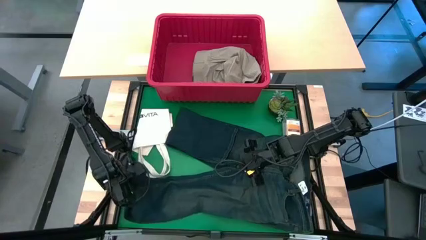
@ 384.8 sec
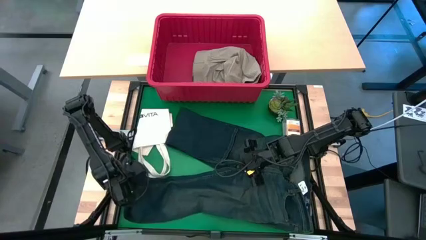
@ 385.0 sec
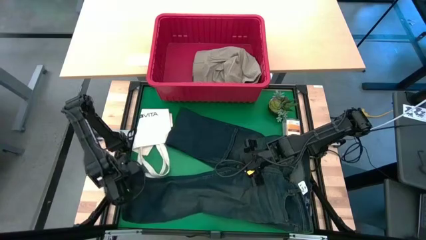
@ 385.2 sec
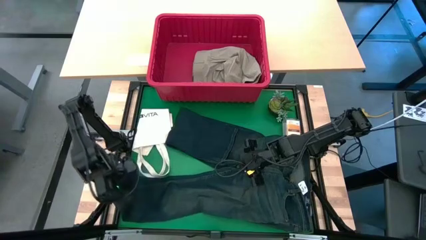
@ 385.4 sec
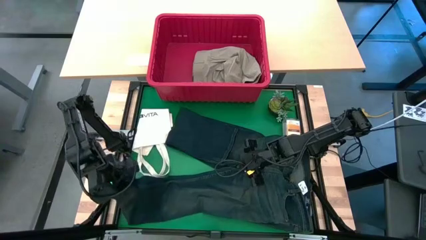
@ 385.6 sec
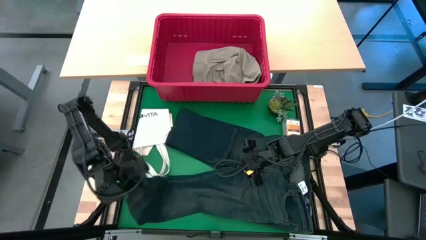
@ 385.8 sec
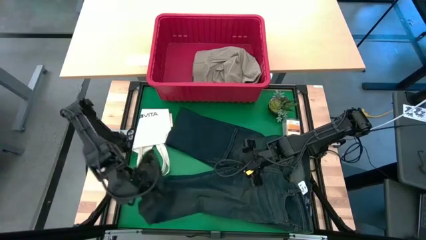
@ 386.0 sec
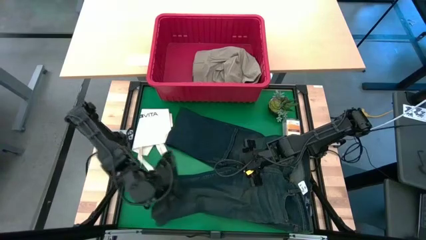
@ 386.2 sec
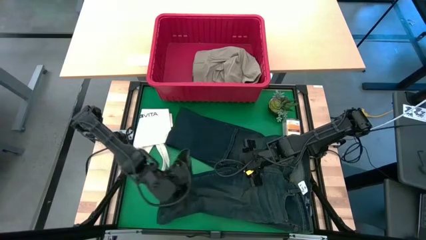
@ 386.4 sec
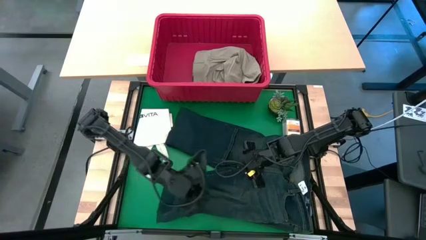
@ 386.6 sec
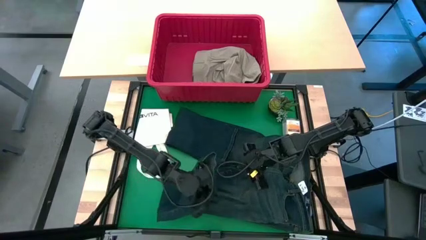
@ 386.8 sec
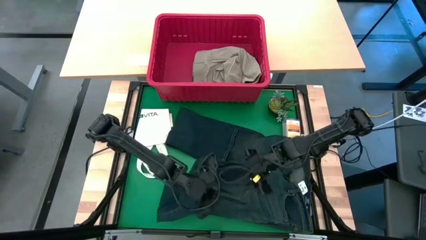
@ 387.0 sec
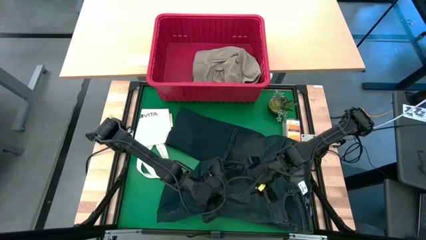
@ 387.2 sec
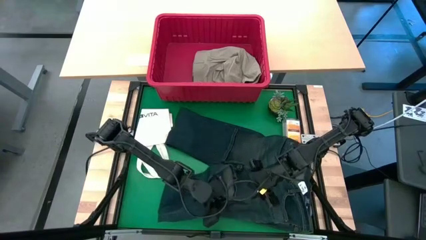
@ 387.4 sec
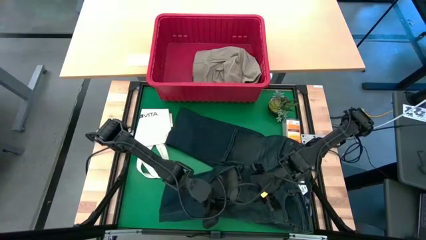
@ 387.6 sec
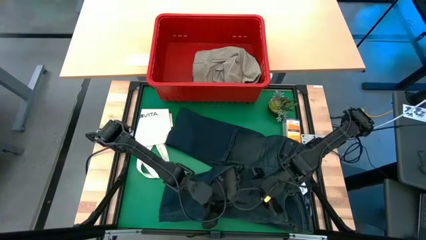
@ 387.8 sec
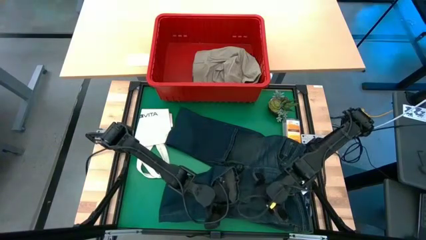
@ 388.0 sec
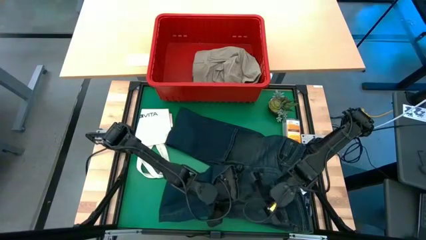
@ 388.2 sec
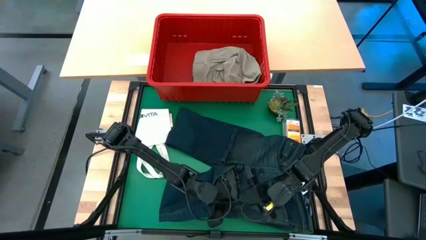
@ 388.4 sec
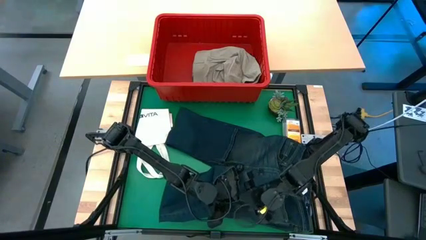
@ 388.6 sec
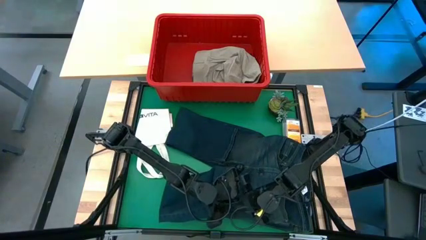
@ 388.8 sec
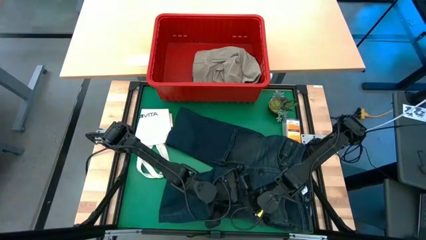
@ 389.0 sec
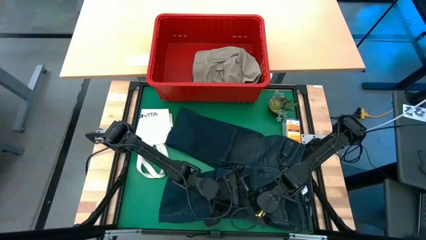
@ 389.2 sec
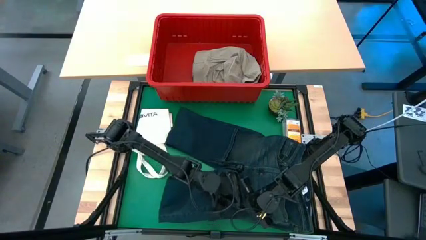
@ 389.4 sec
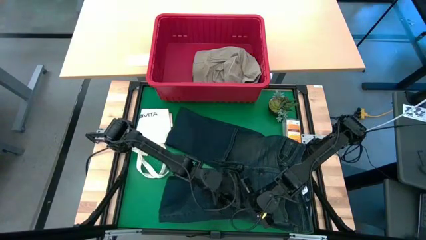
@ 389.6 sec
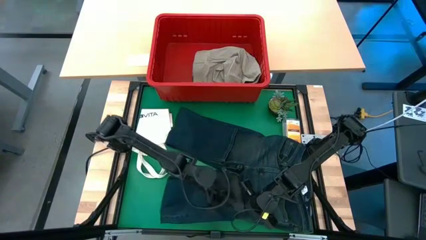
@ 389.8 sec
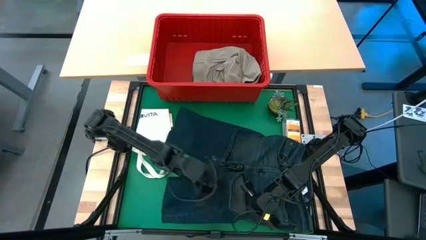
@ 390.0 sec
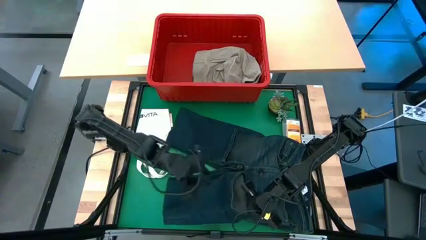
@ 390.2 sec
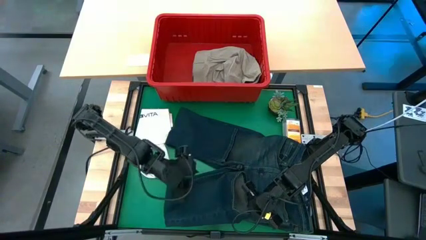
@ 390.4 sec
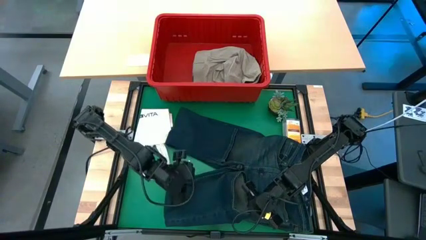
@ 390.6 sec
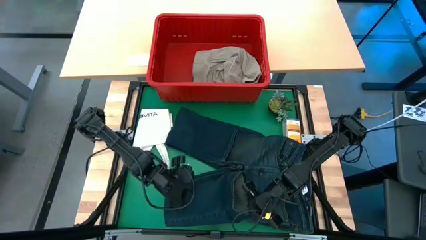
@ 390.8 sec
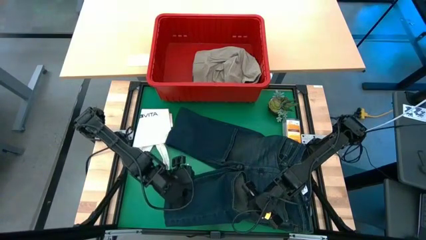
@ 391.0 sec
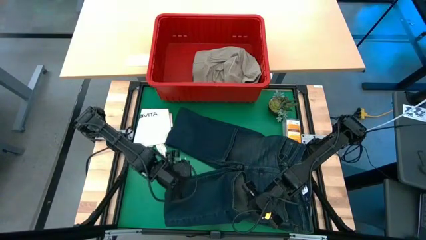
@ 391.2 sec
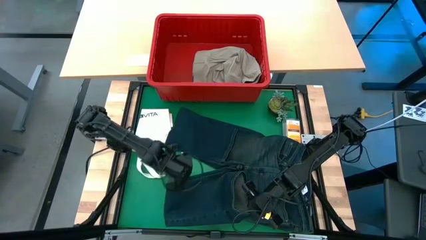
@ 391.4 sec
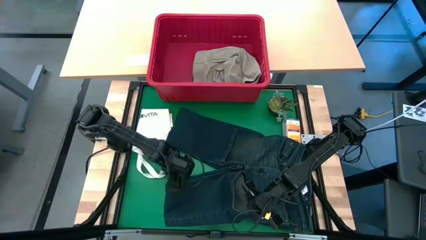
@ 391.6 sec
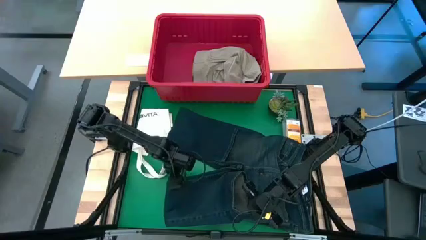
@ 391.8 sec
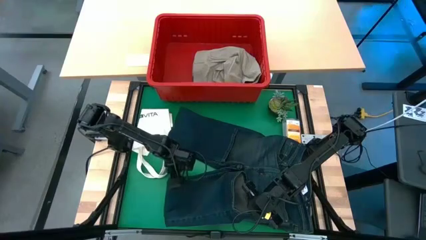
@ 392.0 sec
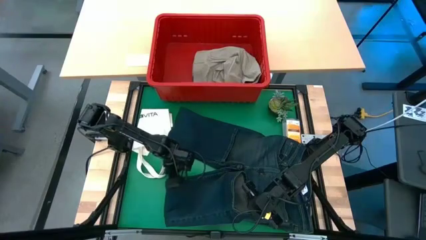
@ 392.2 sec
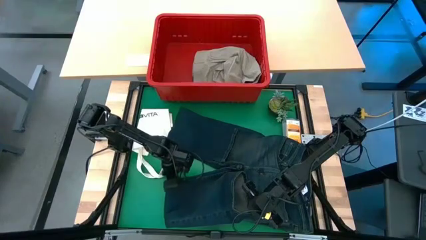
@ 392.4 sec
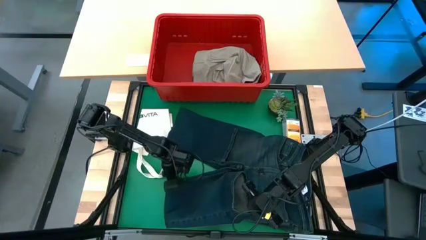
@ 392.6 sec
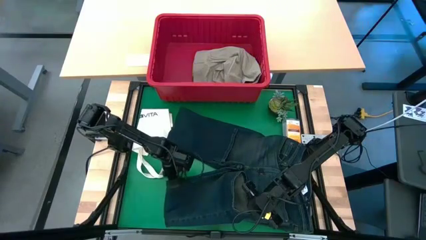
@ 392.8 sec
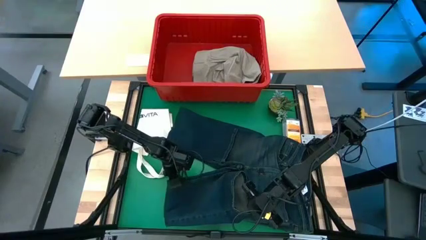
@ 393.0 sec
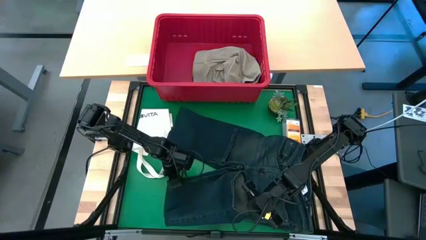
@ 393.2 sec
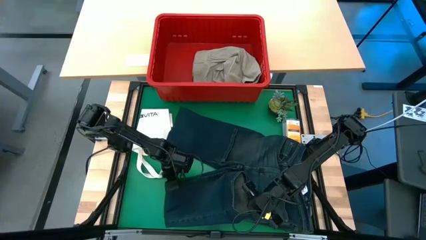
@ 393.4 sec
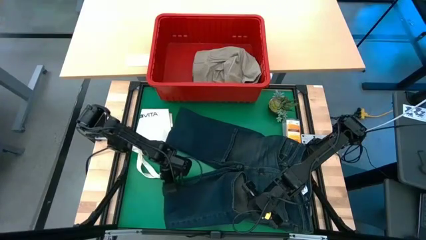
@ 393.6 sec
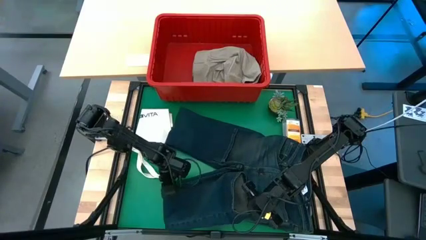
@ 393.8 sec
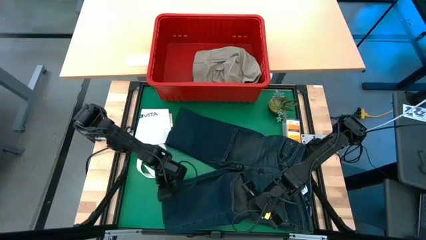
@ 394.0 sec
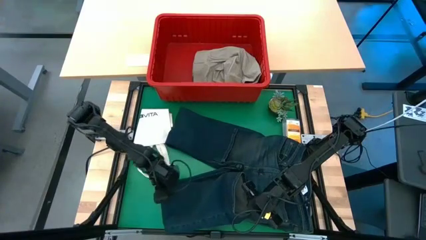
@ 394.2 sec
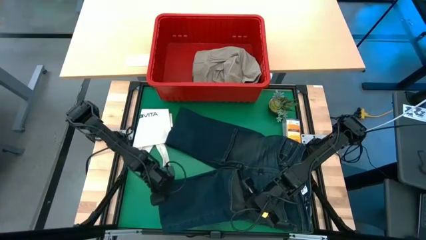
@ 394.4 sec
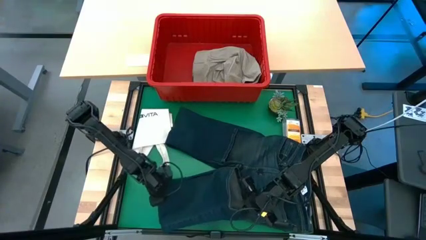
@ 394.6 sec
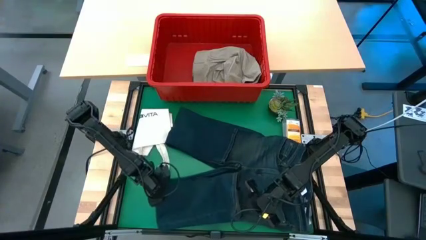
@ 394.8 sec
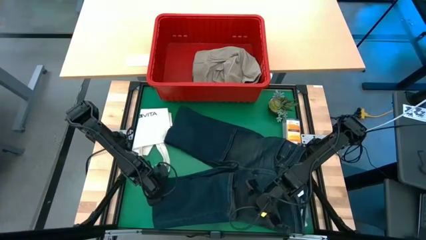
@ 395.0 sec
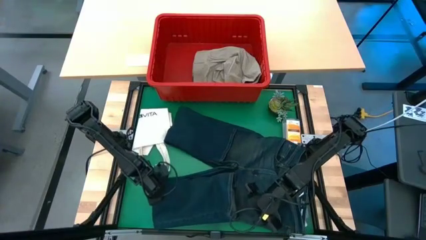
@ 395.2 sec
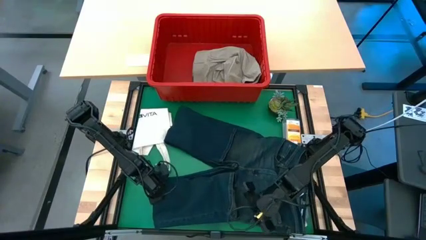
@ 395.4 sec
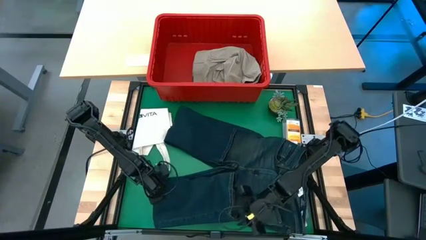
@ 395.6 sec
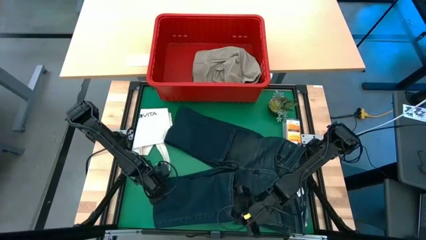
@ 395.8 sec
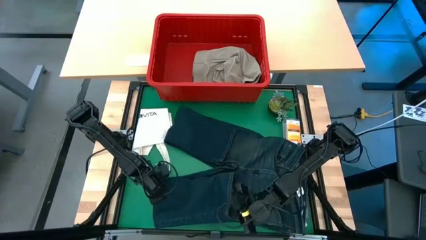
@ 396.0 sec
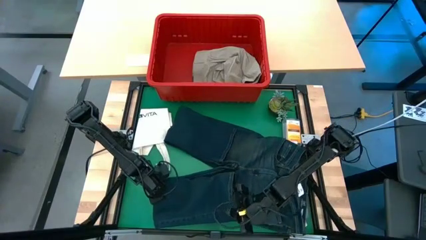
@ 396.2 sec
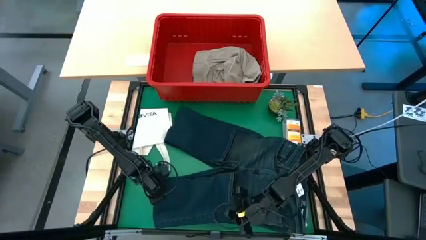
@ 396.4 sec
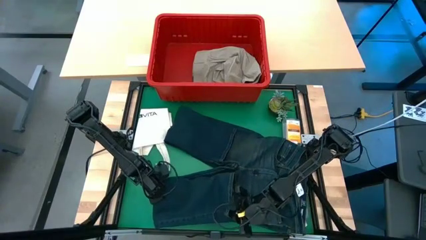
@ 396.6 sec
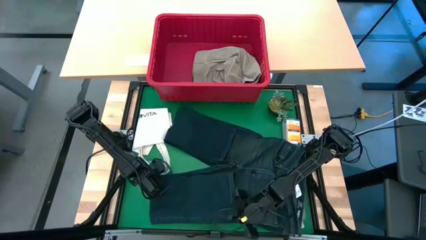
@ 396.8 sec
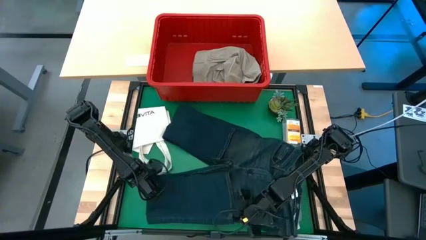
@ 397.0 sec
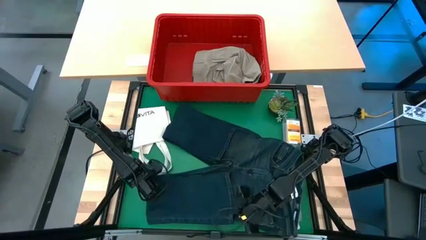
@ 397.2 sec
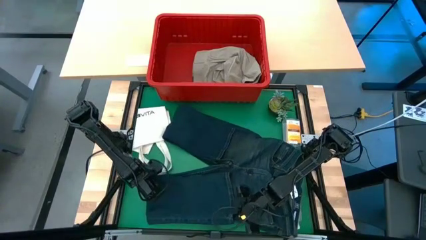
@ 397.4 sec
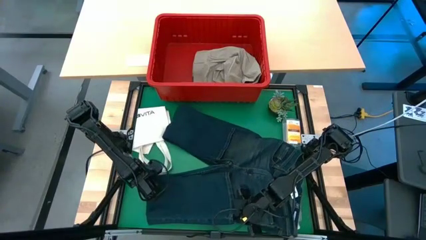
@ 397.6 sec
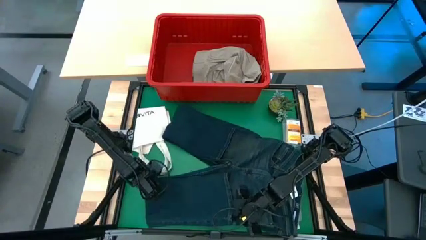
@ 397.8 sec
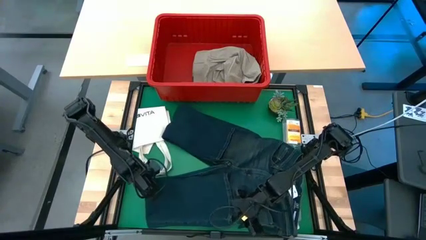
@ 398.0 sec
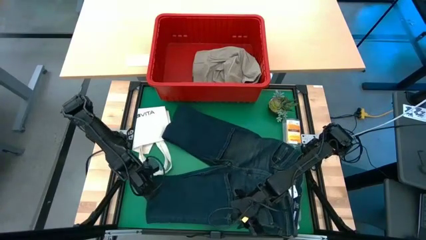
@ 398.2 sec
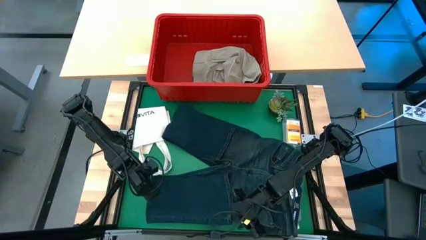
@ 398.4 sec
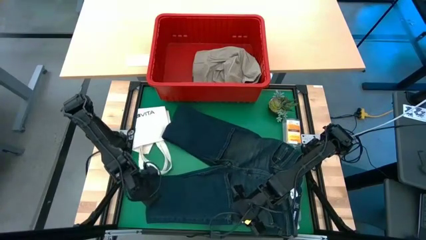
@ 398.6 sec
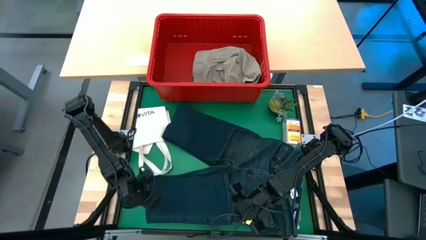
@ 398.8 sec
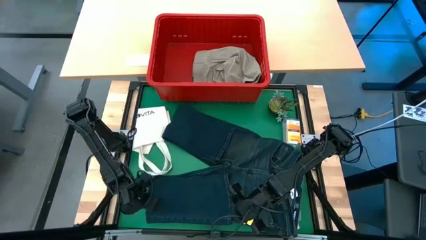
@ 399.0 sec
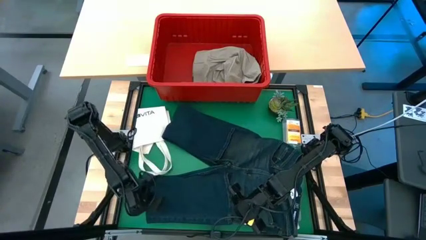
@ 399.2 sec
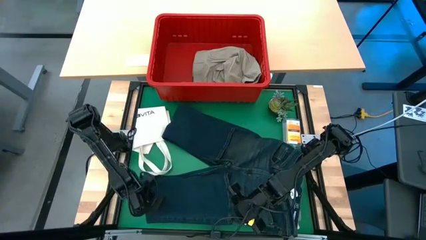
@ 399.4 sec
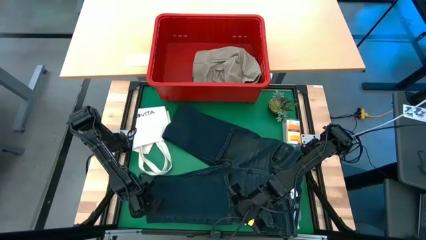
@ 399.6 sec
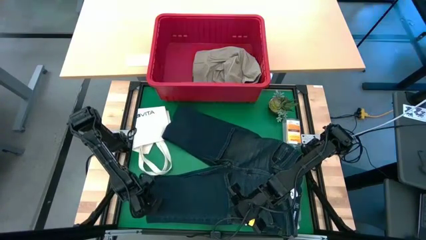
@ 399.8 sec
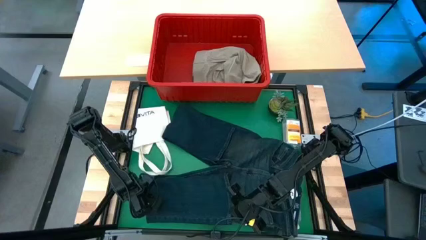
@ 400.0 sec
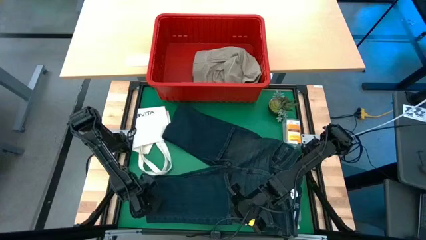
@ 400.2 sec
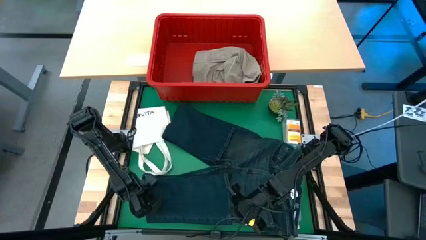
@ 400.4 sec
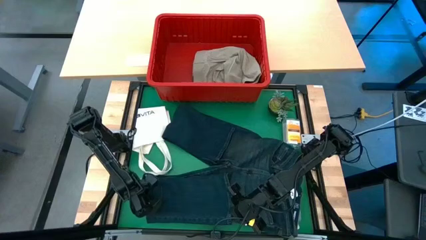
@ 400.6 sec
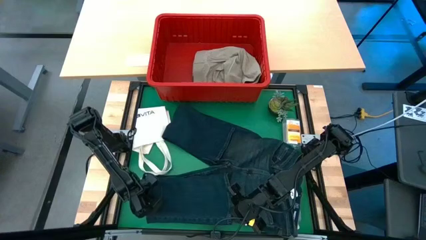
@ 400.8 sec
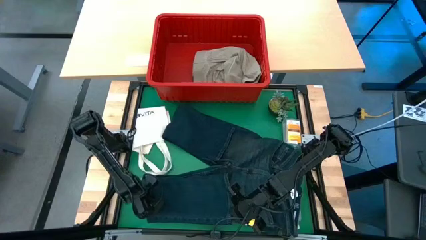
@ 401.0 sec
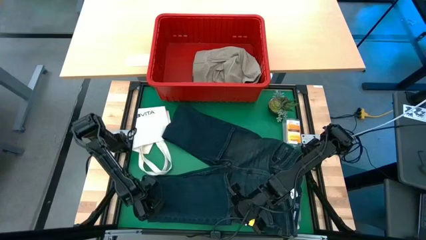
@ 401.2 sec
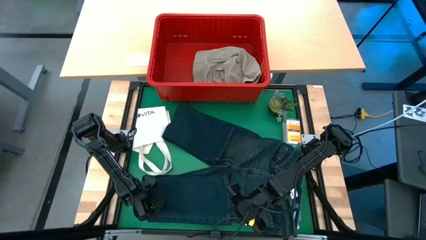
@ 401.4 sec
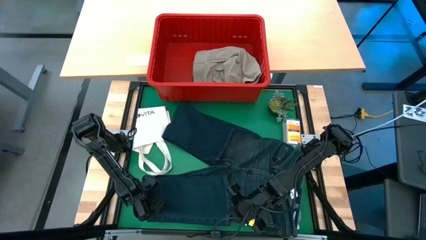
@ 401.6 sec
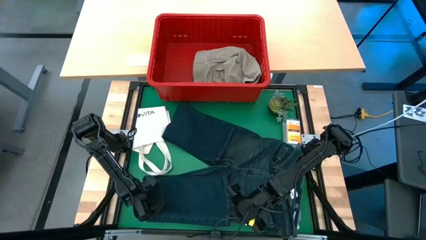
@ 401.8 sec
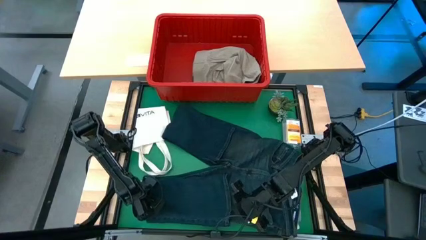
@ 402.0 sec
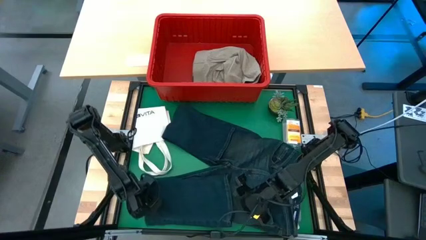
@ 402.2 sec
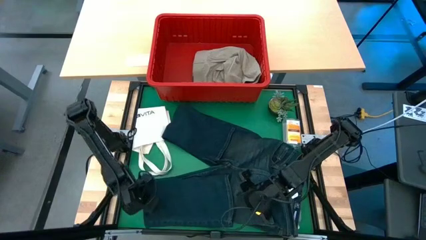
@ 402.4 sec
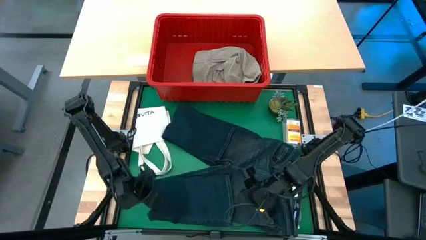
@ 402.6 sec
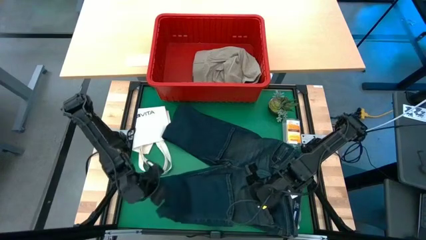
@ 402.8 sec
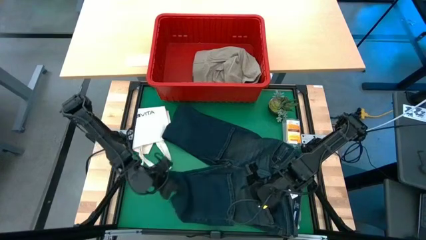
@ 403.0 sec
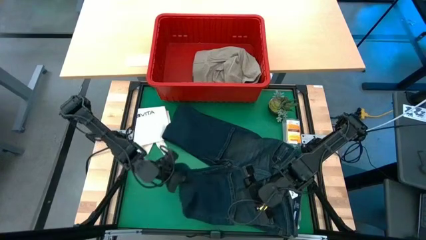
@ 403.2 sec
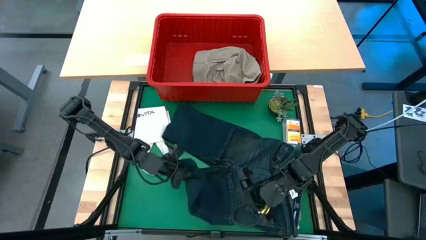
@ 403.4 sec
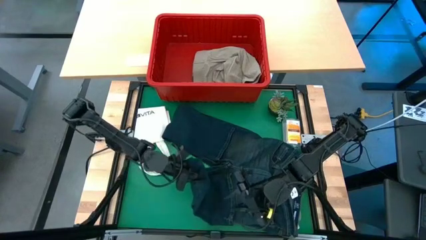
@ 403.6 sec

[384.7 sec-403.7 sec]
Task: Fold Laundry from Bin
Fold the dark blue jeans
